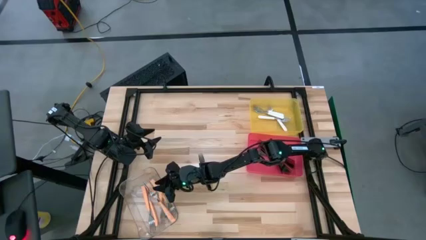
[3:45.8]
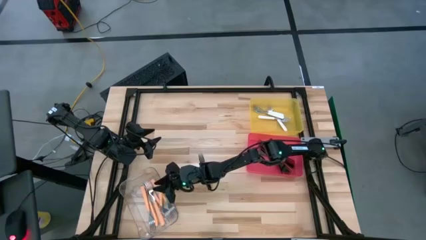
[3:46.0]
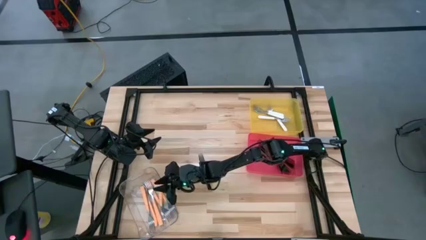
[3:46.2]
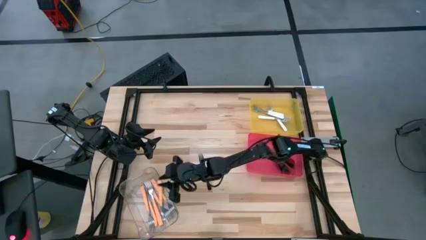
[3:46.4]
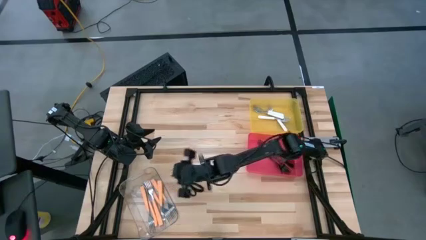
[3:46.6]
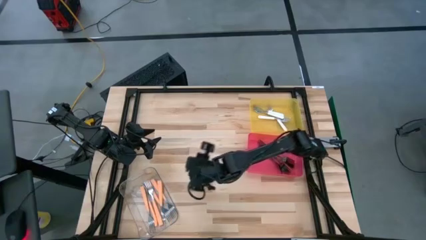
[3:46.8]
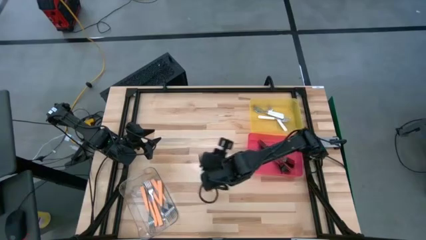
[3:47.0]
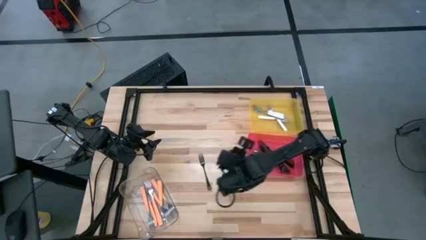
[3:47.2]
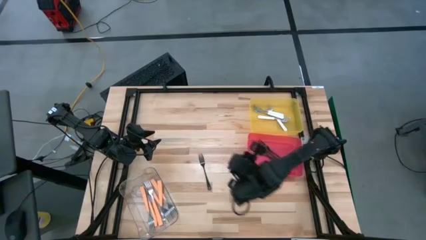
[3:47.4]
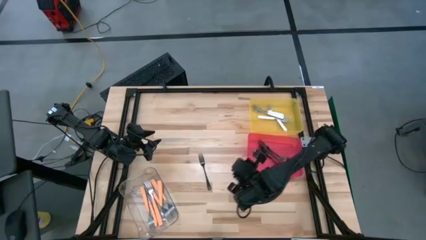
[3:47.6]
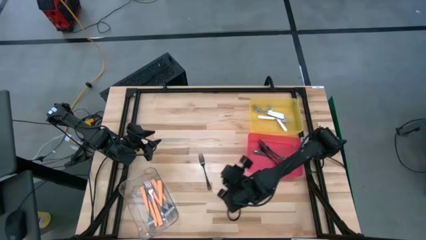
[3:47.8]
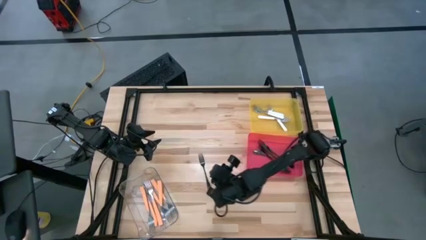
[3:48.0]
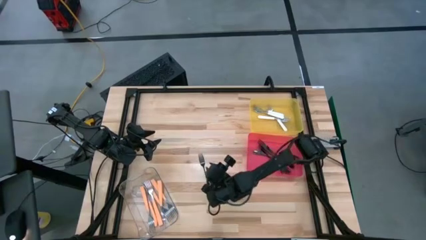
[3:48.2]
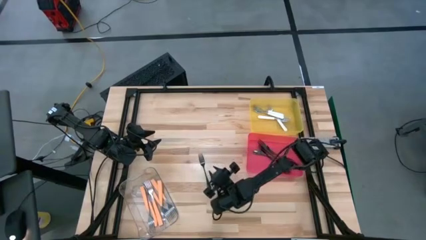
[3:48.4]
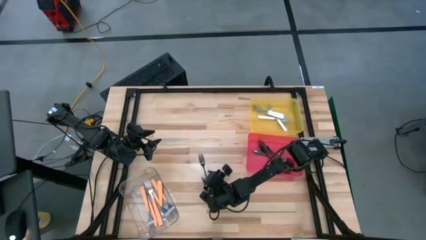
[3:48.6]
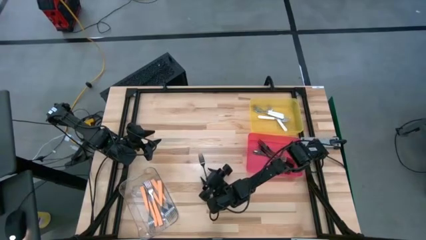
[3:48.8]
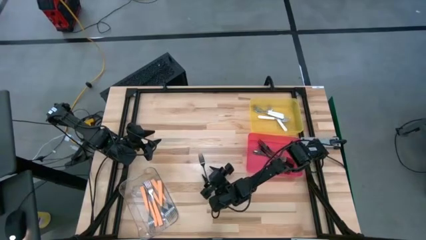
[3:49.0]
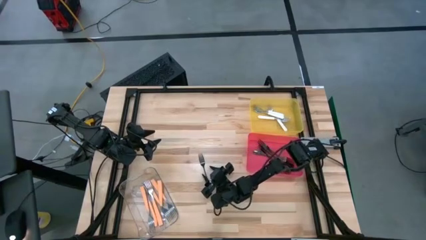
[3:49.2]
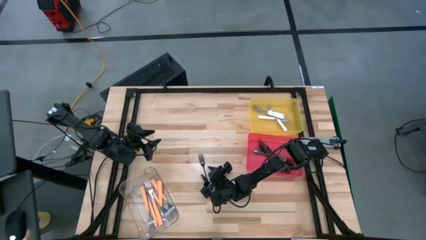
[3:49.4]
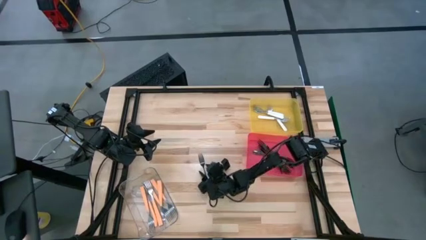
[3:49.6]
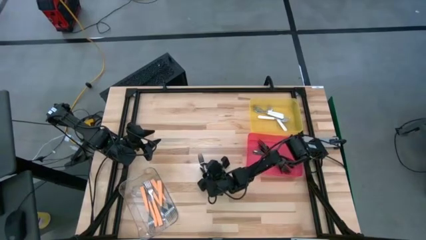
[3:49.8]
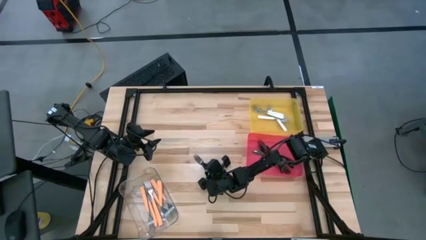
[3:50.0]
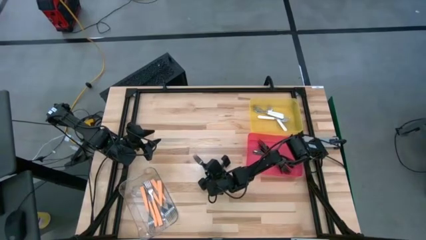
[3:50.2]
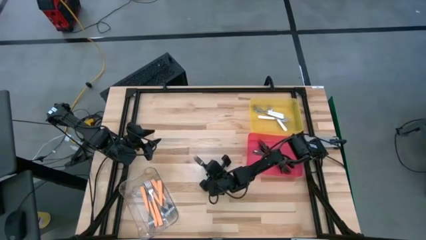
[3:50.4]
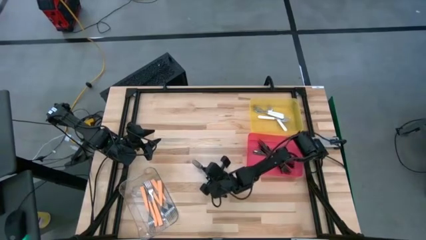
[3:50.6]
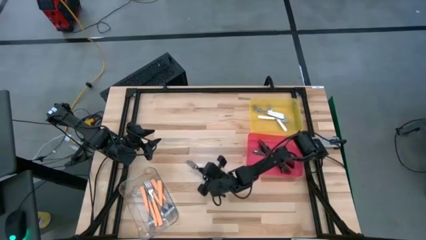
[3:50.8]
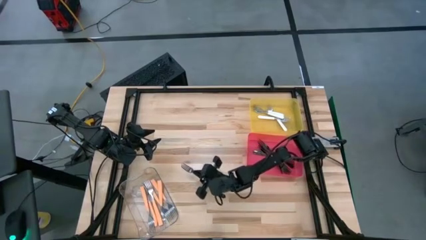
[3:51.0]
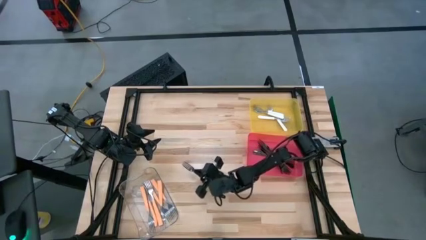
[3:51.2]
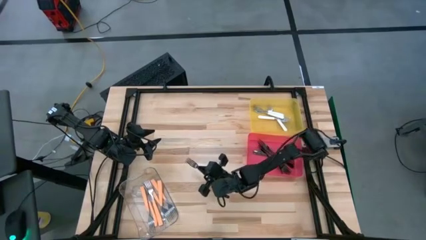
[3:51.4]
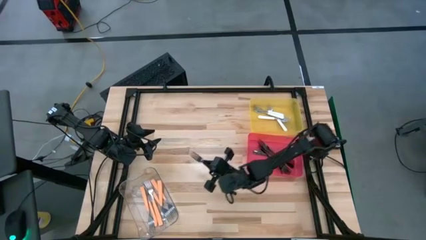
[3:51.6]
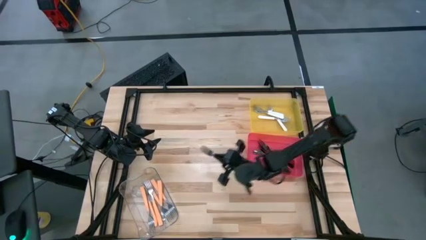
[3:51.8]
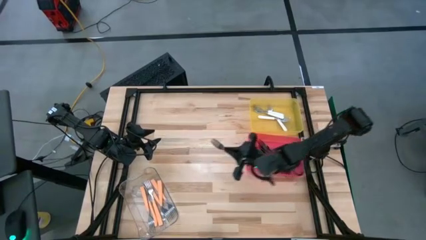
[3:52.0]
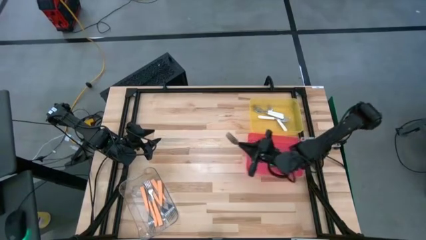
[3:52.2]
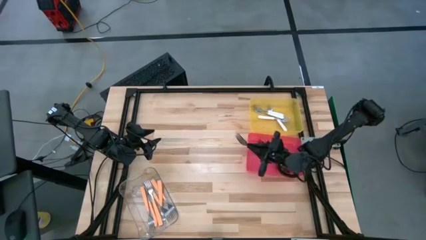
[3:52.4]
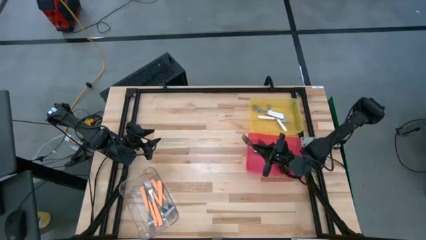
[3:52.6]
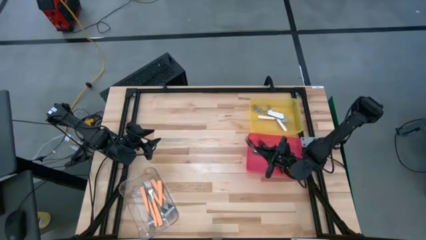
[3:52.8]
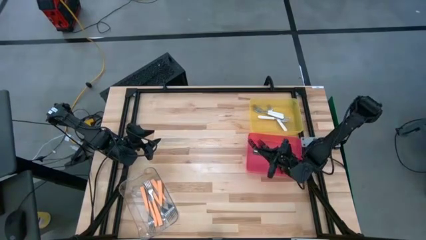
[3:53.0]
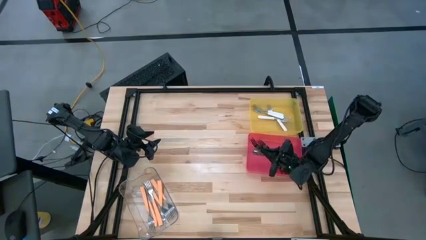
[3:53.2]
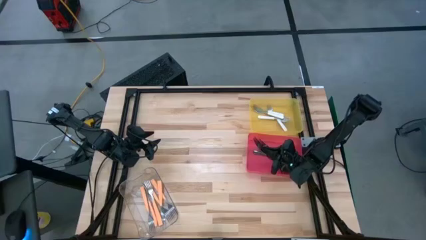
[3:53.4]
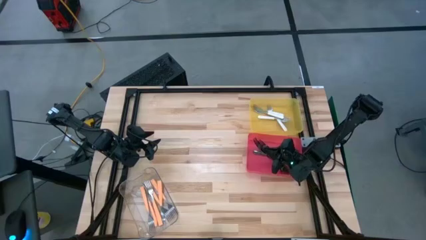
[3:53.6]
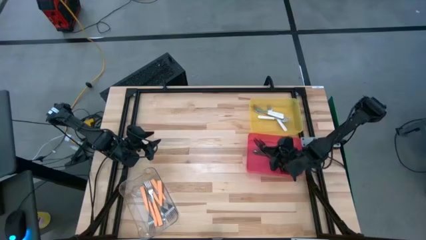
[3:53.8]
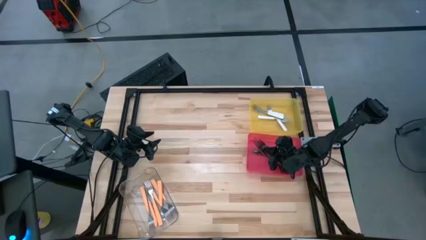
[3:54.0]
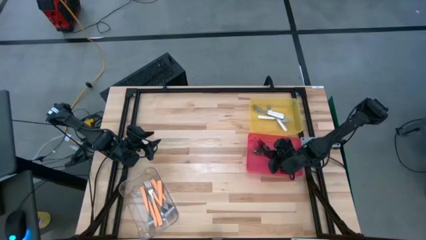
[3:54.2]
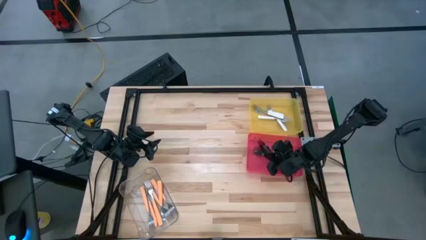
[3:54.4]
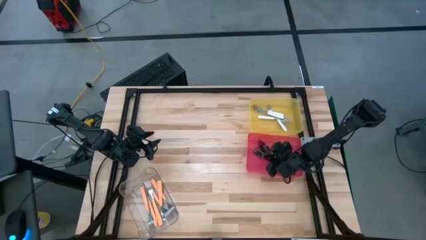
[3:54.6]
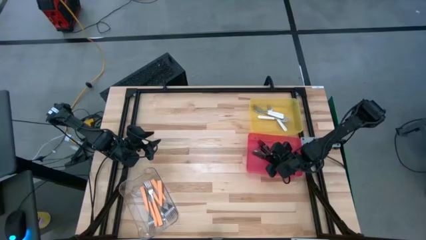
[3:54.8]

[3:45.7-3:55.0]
Task: Sort silverware by color (type)
Put the black fork into the red bin

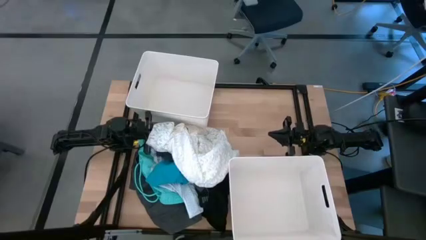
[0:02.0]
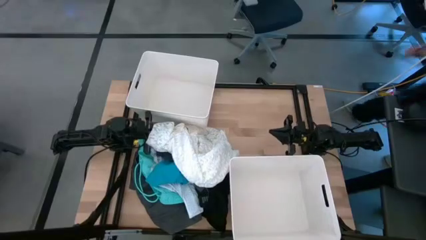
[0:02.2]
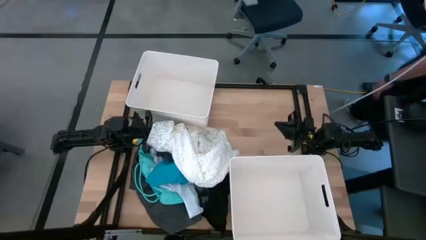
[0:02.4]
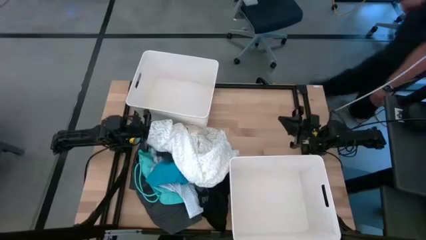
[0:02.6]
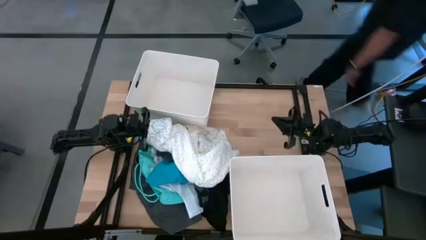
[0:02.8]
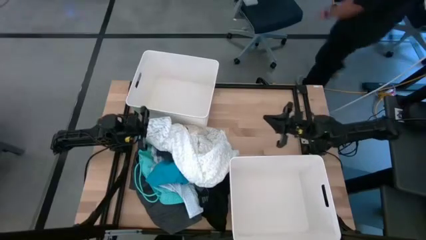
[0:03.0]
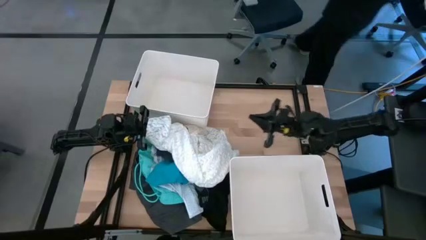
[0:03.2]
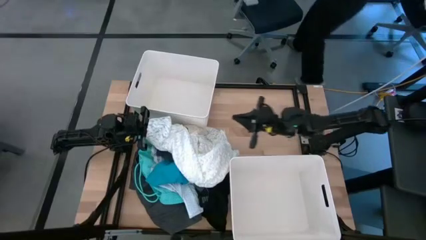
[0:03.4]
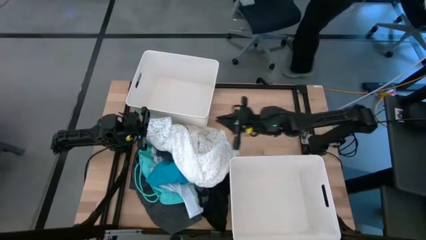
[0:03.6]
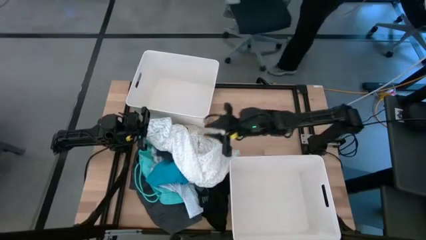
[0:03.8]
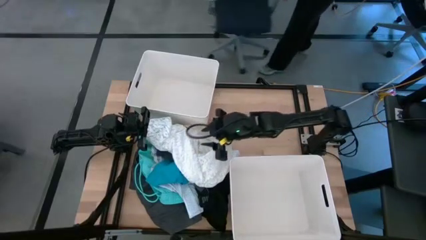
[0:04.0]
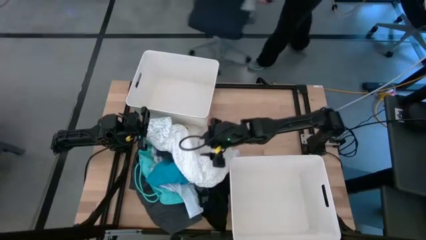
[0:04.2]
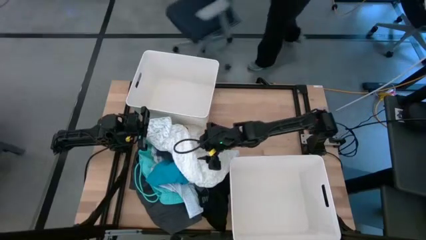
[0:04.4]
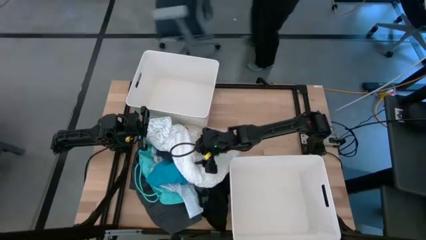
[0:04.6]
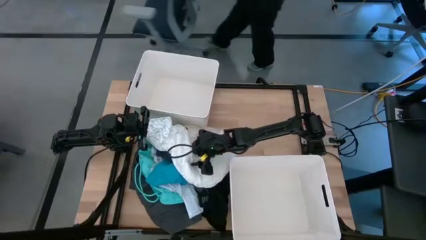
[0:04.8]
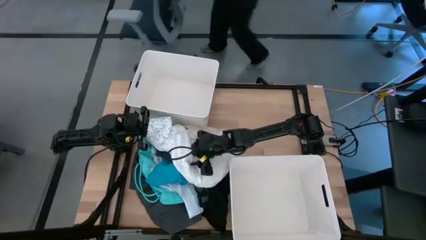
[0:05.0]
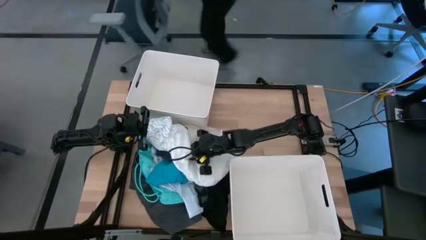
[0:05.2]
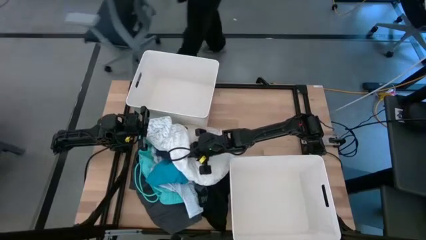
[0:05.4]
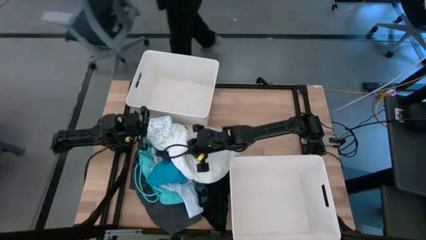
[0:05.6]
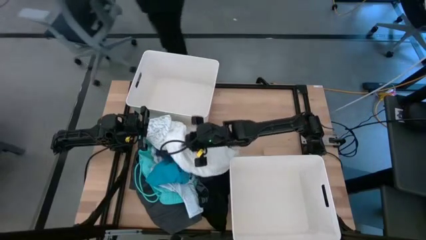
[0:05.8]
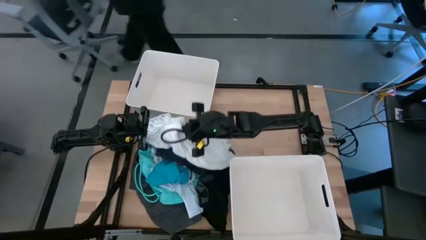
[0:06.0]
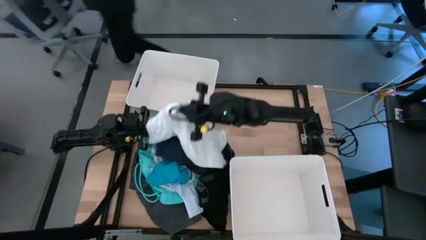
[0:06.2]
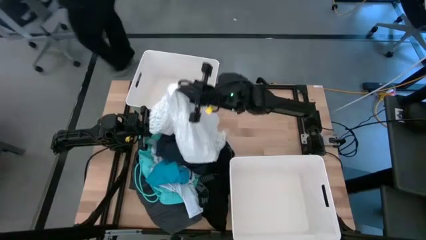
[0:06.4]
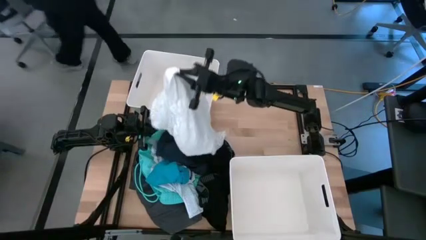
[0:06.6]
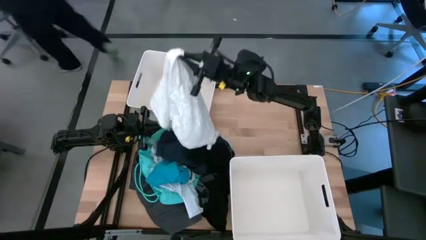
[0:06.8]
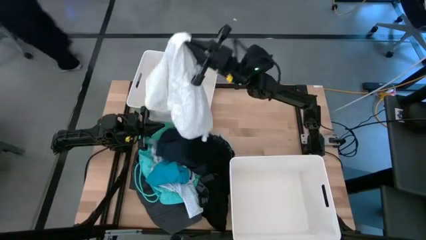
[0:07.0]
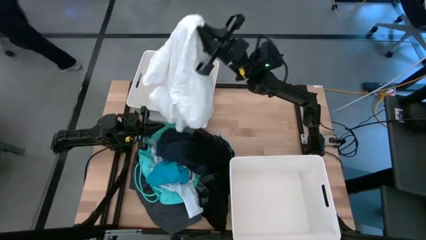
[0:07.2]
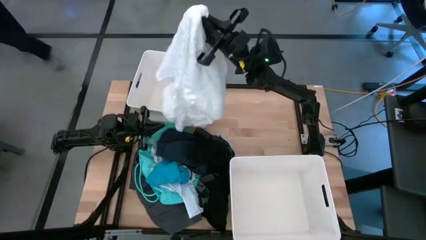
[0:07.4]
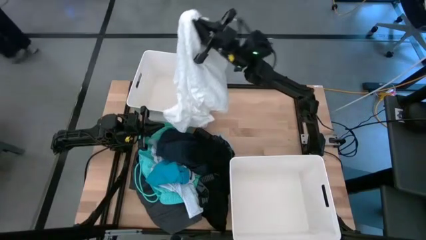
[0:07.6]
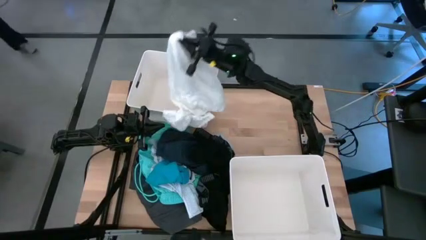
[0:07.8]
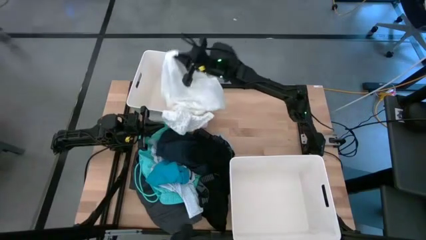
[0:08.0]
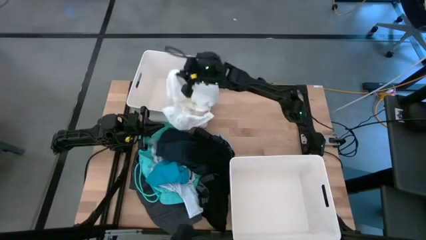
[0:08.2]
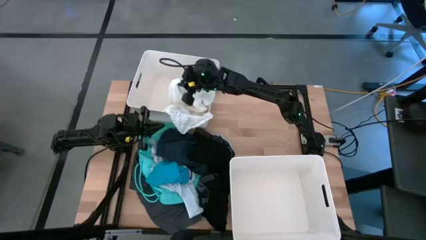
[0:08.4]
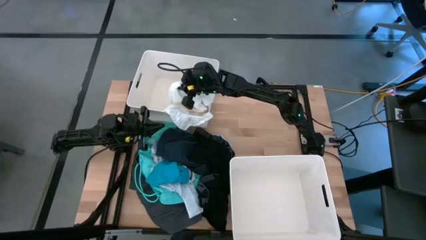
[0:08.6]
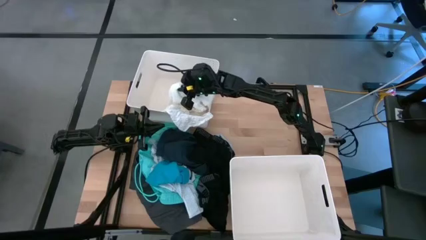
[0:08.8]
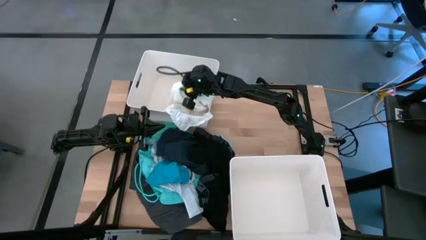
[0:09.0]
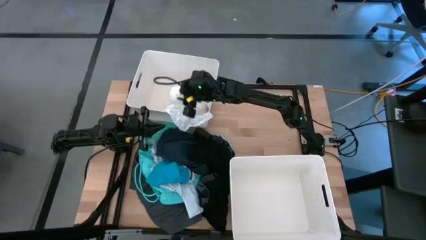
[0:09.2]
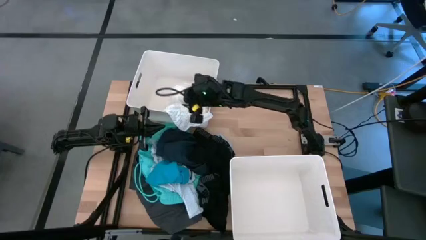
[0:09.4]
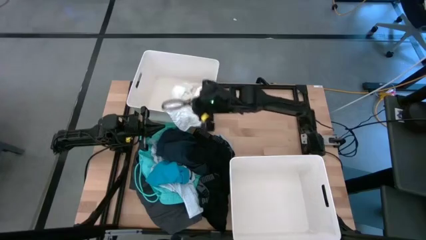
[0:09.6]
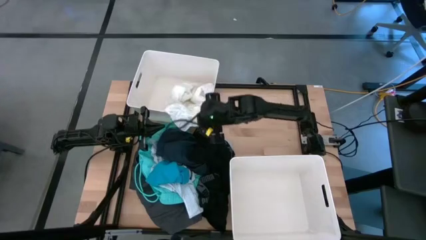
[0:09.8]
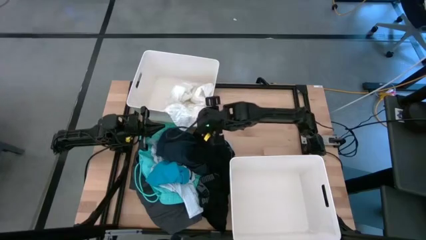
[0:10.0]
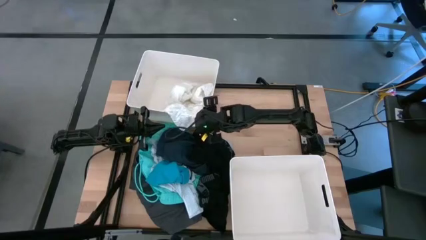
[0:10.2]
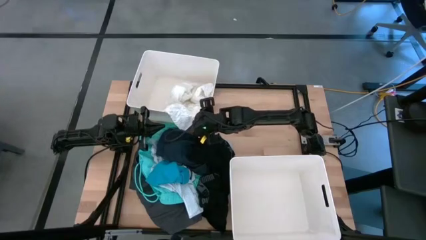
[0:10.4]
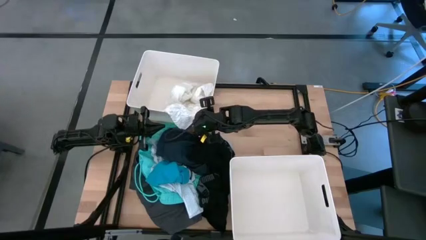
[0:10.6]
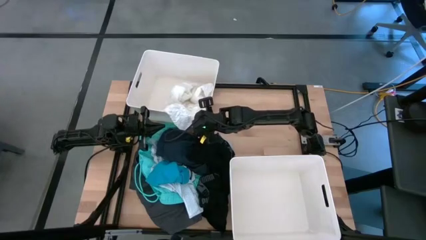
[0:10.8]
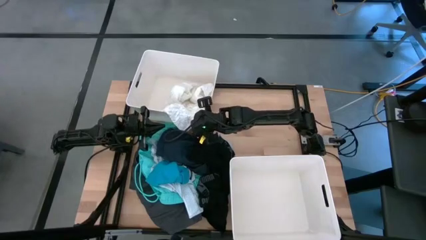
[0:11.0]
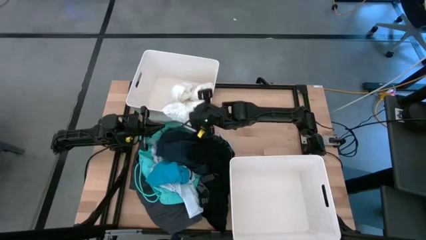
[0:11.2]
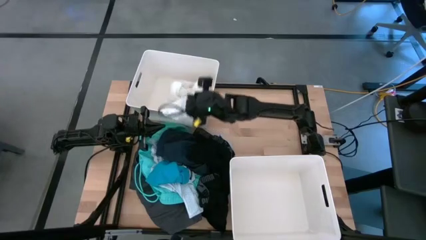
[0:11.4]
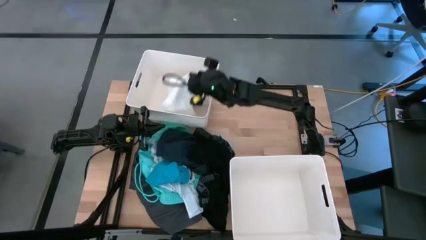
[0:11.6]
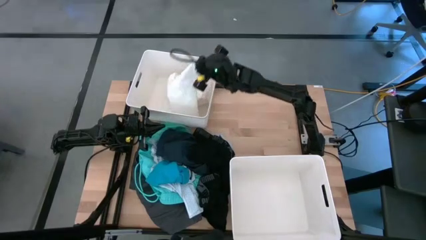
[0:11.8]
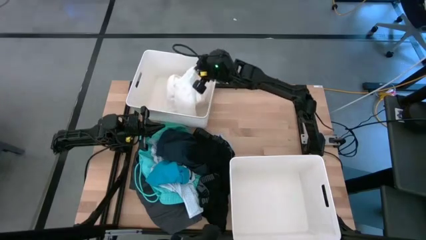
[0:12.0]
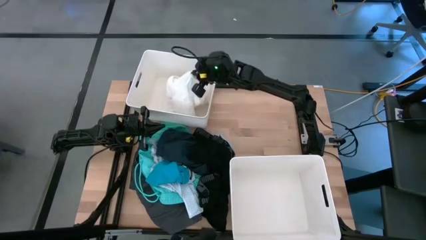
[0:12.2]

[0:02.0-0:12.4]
Task: Sort clothes
Put the white piece of clothing into the top white bin
